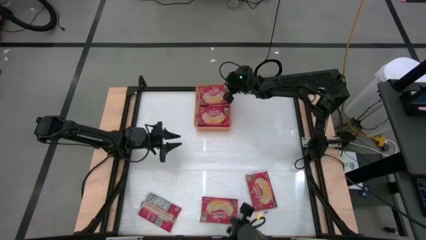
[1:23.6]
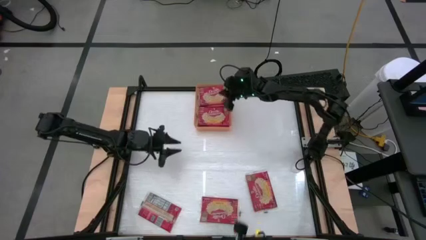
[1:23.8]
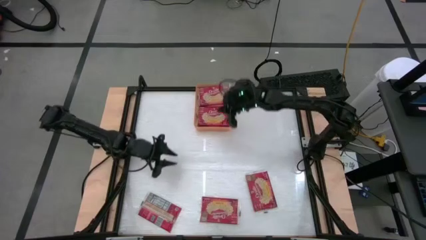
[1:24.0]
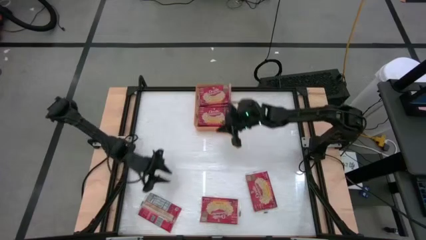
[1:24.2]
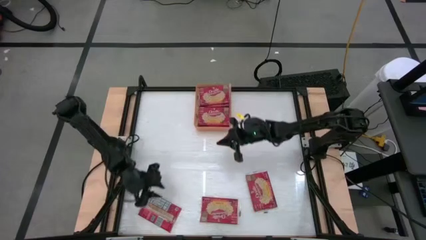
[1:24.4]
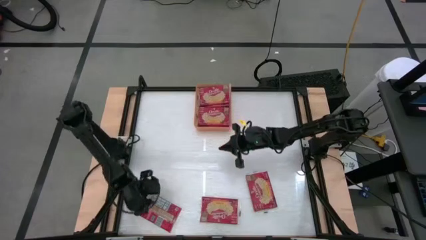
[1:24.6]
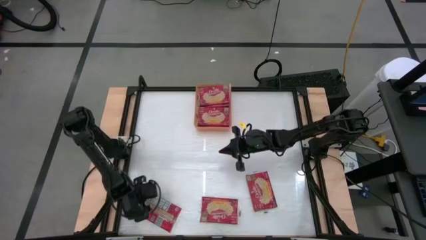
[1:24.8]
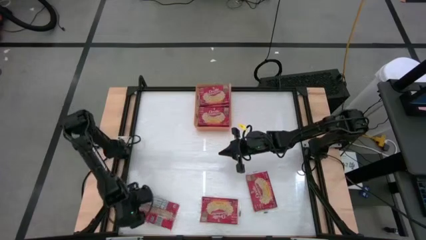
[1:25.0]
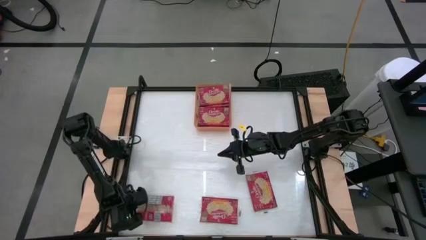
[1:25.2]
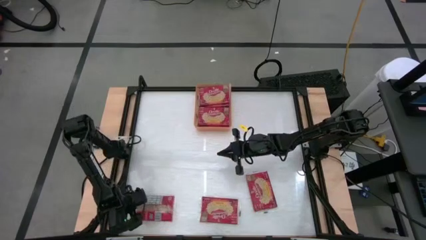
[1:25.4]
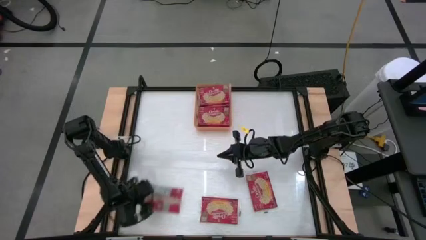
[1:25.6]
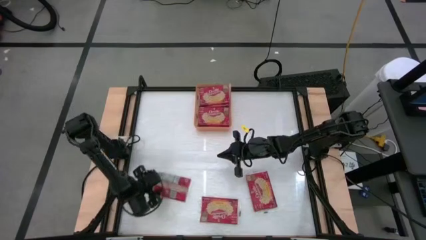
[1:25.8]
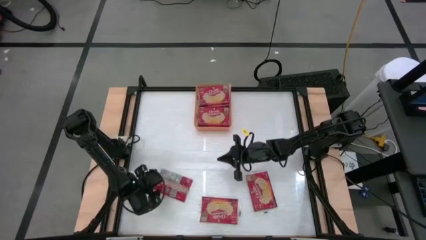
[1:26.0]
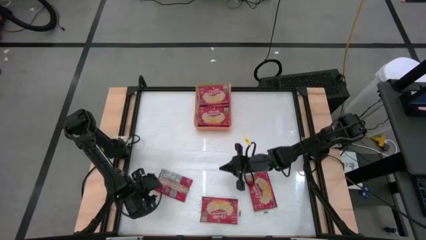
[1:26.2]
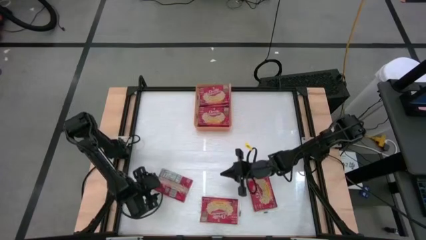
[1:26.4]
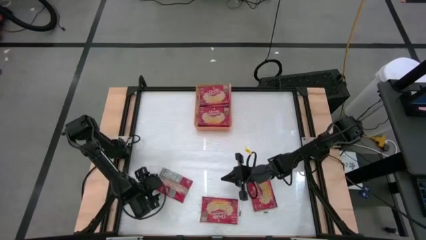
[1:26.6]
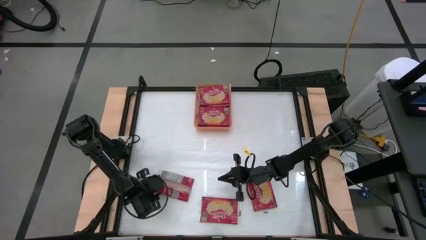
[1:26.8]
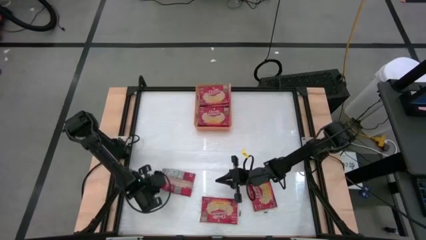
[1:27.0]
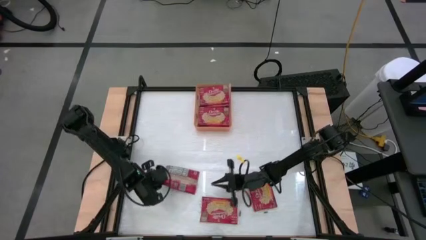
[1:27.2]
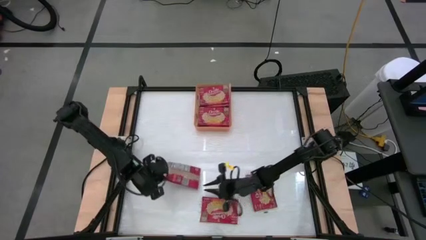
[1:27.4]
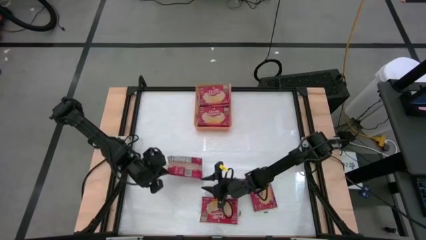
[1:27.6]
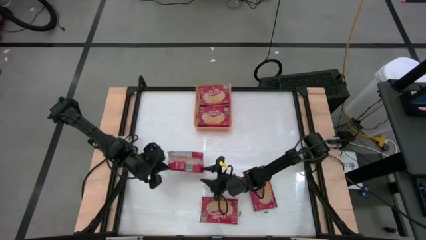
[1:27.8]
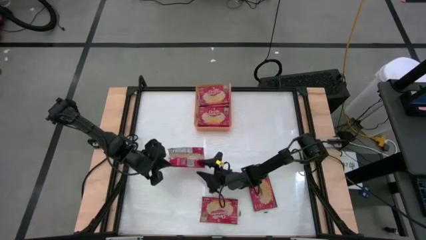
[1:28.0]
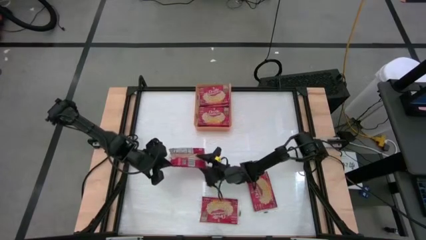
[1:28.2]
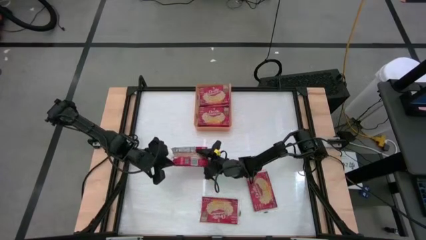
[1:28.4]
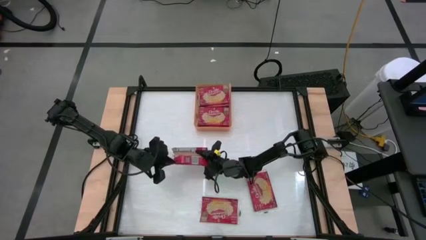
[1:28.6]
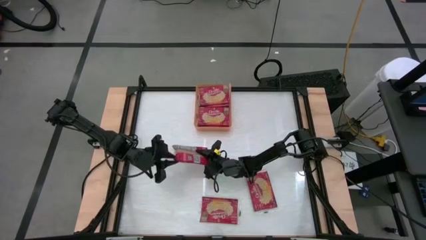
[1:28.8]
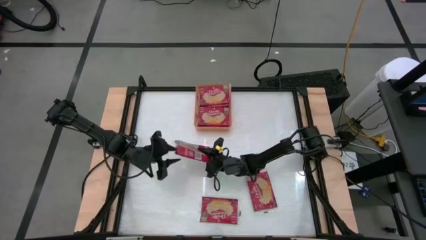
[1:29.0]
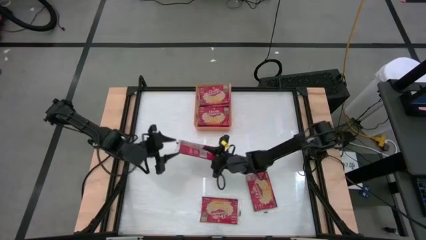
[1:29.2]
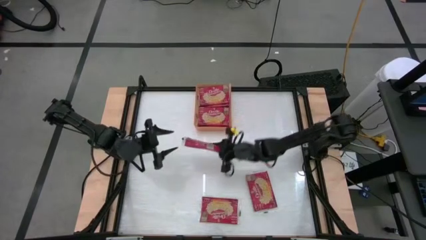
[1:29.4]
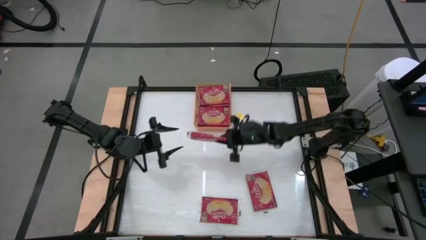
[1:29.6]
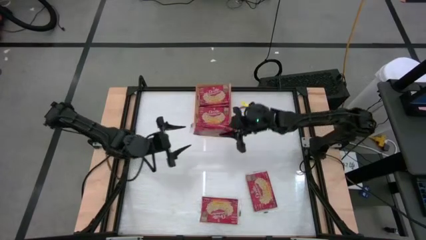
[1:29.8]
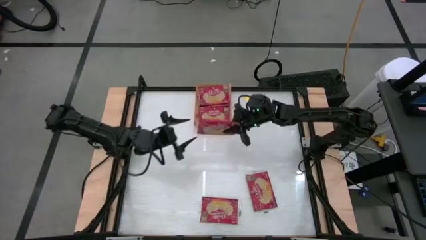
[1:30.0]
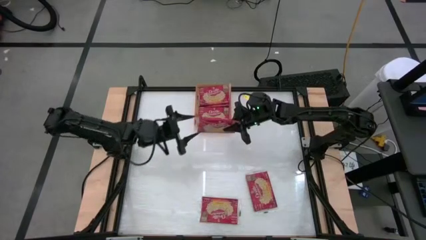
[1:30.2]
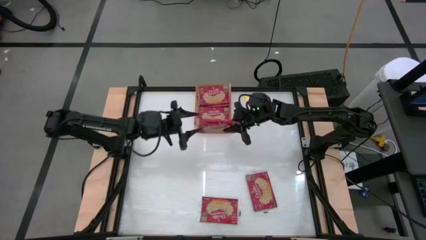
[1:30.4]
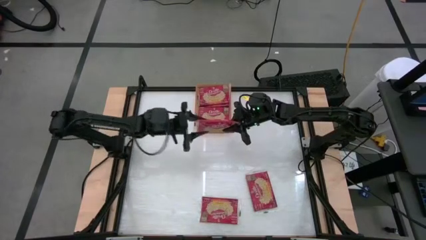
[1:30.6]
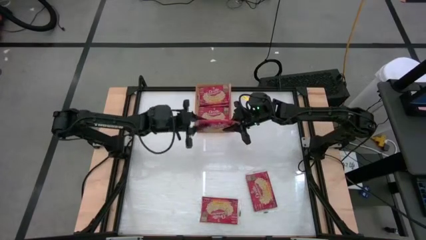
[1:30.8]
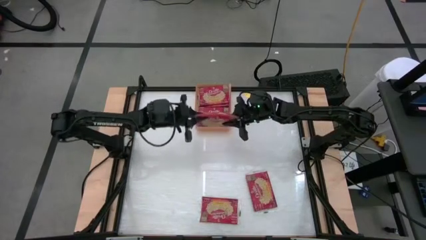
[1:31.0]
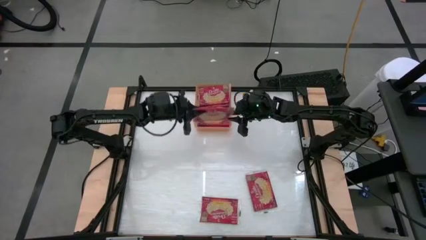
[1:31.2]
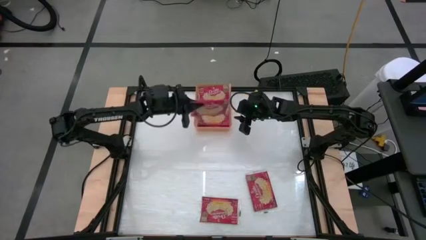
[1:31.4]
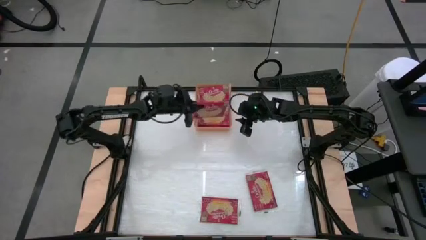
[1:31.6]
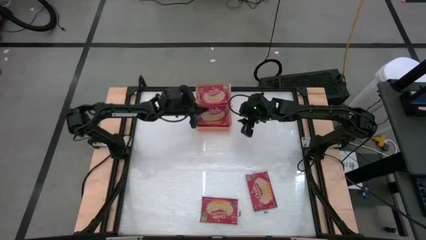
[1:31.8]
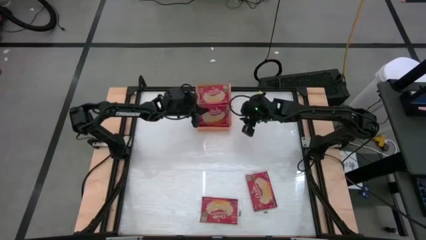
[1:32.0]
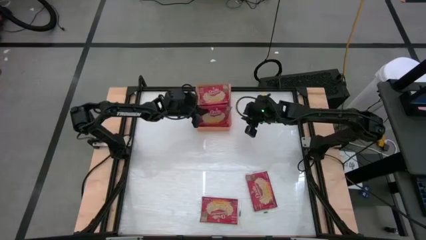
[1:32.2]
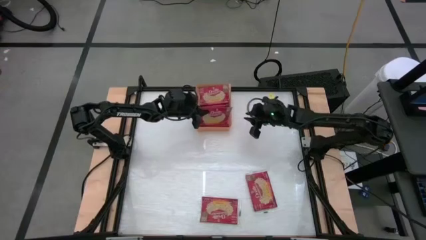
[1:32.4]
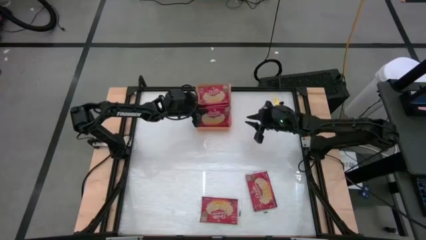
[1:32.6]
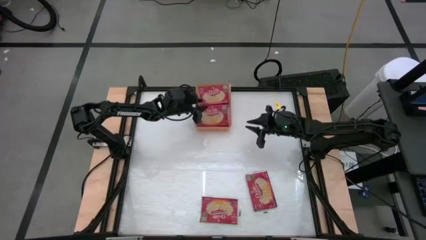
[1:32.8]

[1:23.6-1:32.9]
Task: Sort popcorn bags into baskets
Put the red popcorn bag into the orange bin

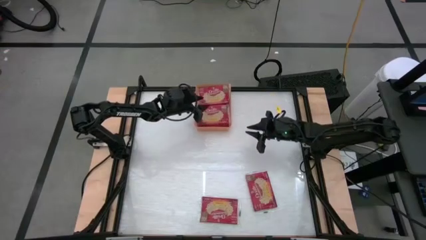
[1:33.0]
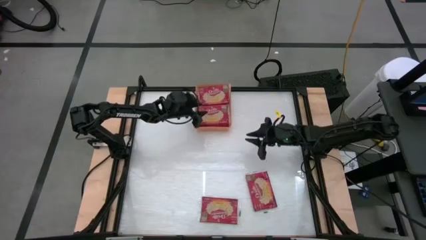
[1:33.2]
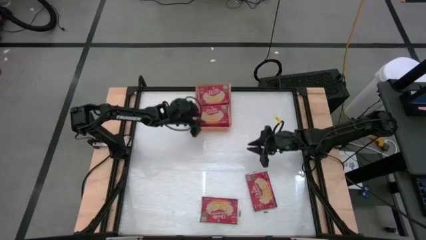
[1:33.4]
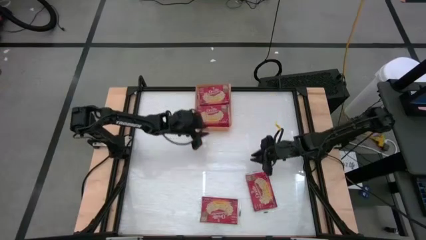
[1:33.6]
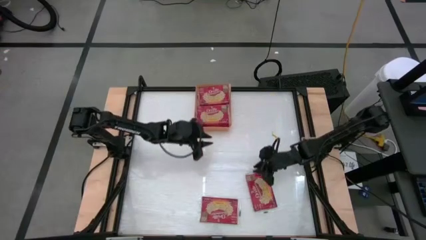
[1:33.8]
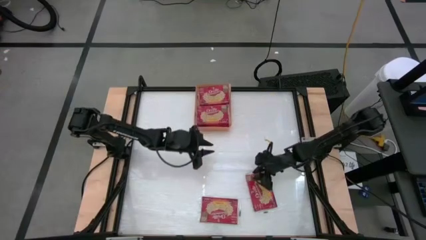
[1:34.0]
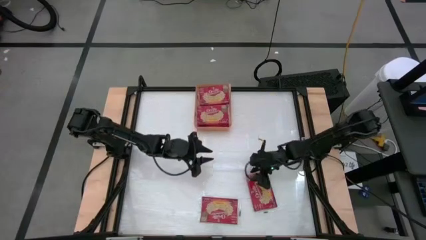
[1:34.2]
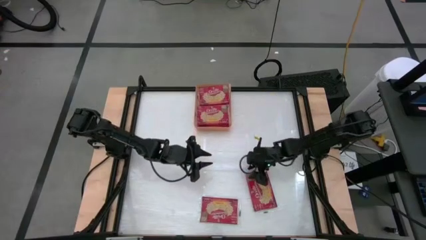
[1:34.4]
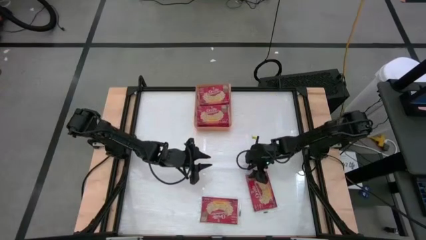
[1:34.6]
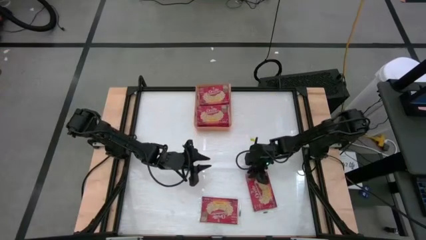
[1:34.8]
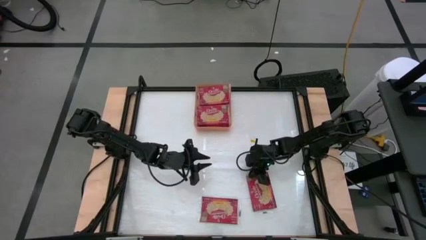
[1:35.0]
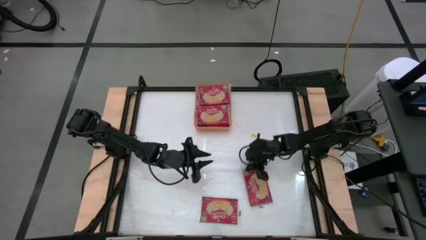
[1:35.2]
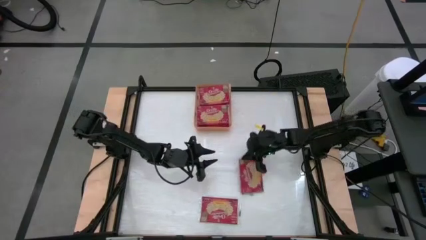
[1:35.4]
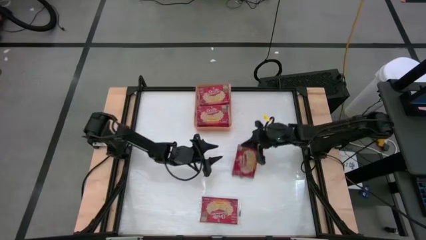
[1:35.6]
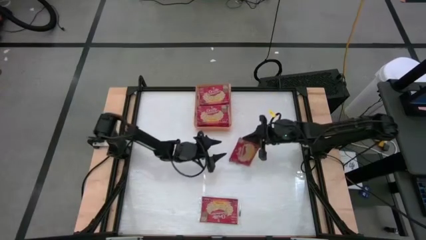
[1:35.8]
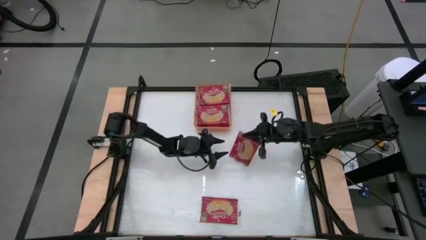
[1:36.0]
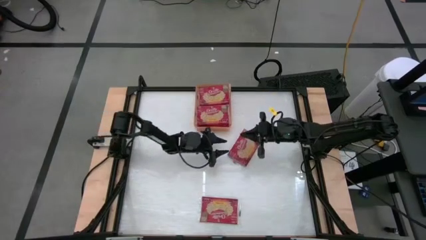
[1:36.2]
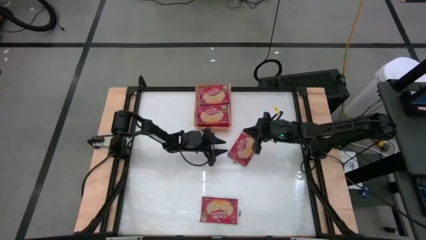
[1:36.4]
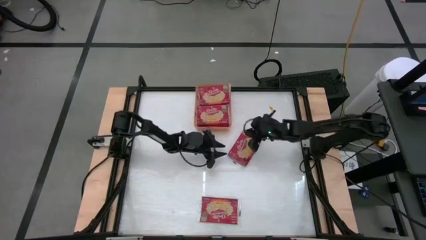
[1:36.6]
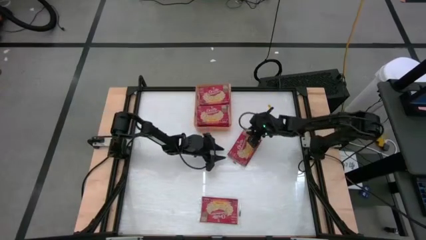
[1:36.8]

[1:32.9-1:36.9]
Put the red popcorn bag into the orange bin

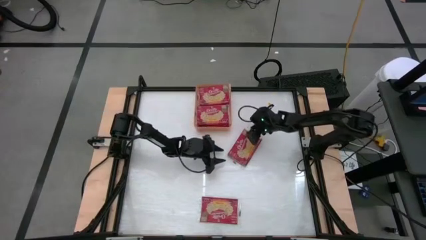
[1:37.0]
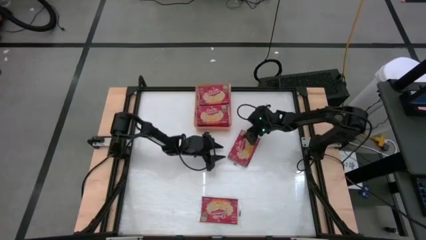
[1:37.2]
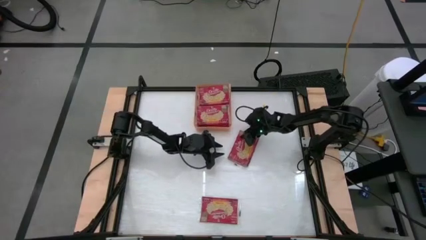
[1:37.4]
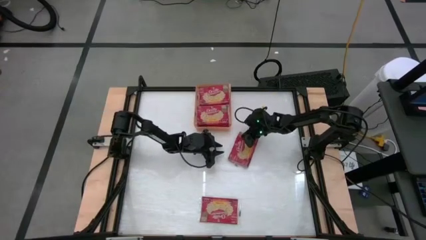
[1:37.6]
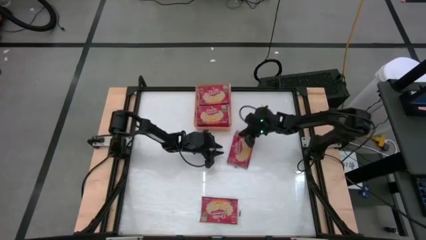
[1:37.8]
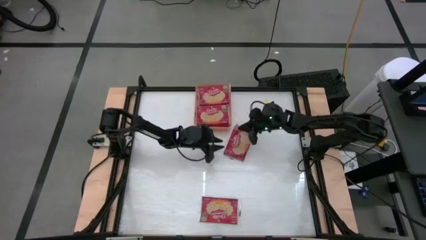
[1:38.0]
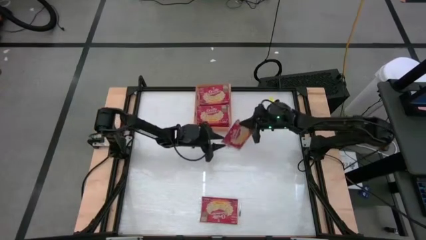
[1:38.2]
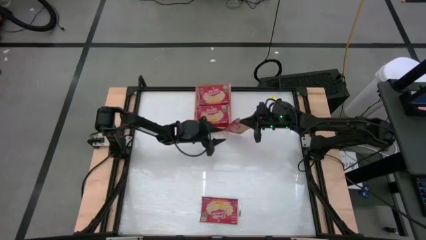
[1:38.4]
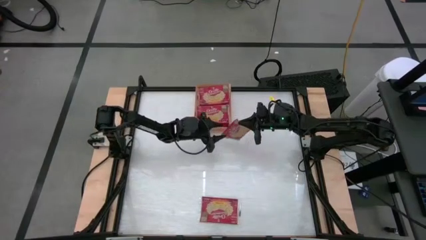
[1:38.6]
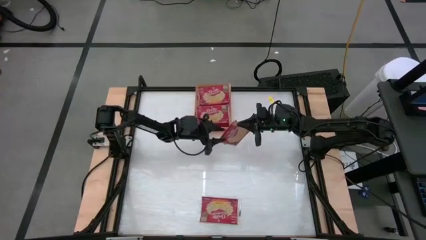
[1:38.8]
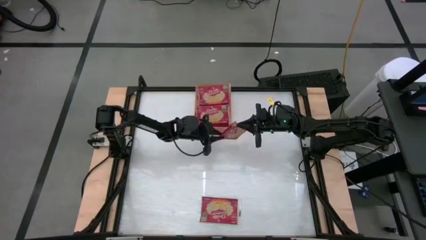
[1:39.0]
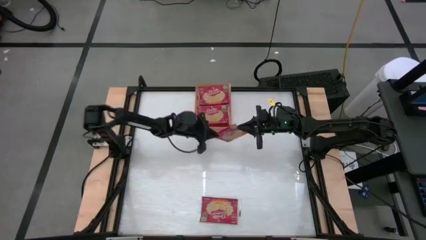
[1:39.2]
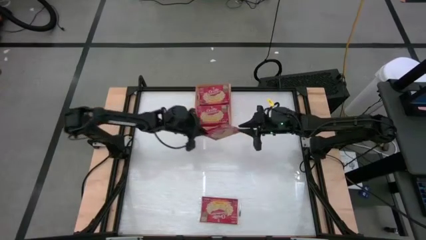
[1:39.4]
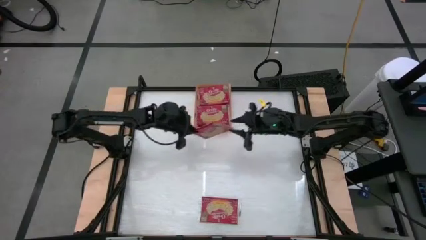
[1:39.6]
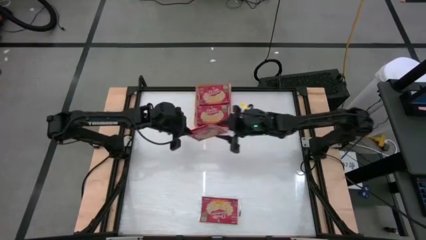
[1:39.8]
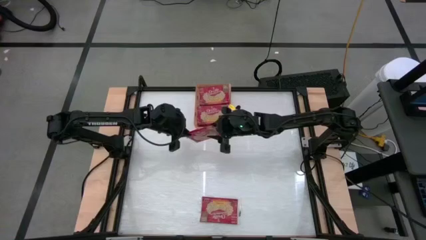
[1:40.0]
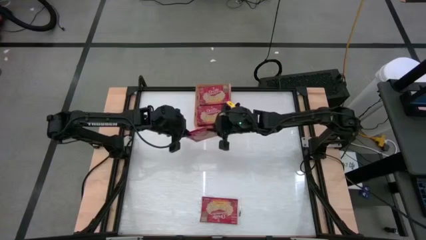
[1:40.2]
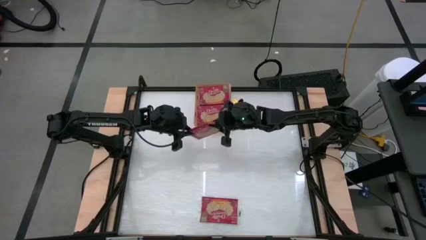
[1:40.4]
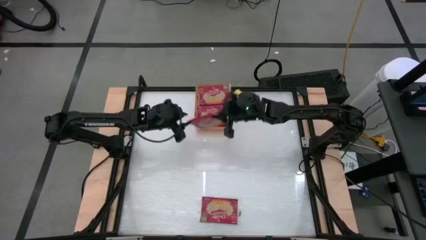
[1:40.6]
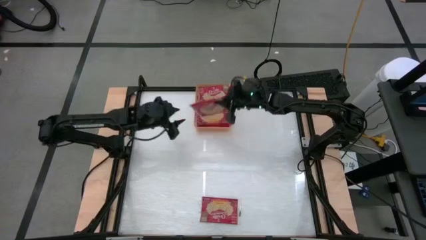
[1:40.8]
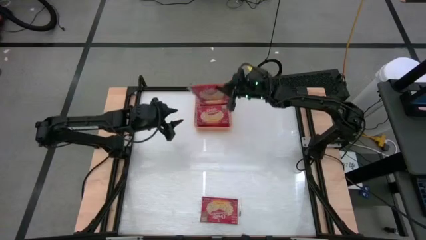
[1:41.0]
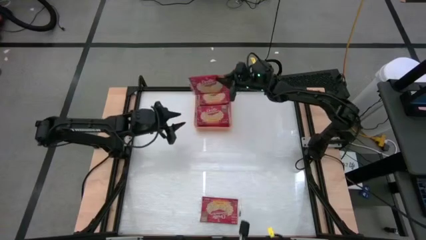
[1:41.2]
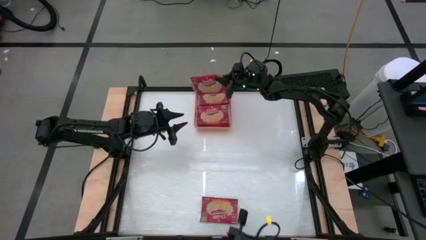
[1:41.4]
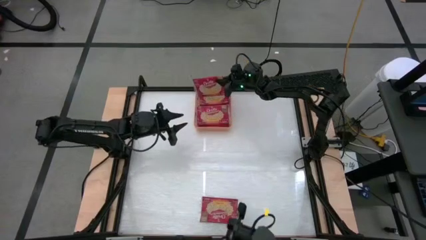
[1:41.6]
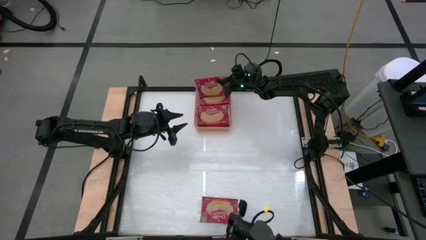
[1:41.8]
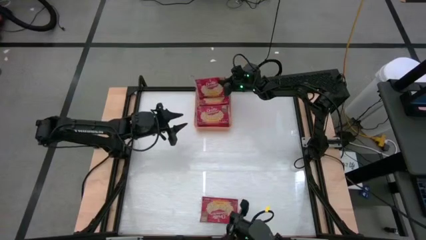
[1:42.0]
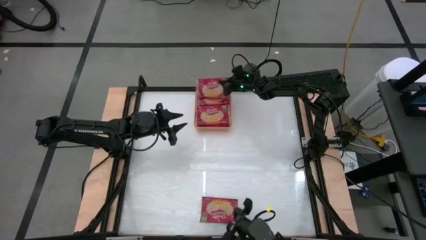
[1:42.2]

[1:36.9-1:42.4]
Put the red popcorn bag into the orange bin
